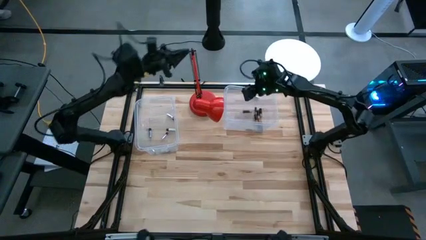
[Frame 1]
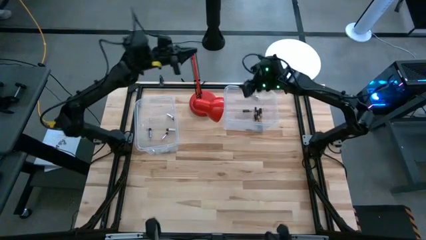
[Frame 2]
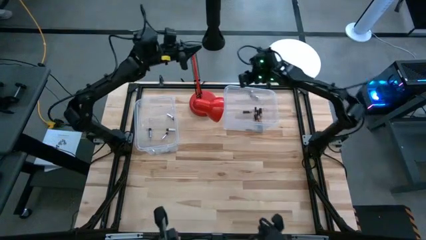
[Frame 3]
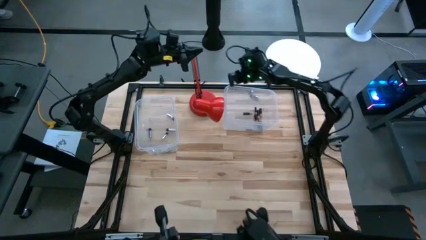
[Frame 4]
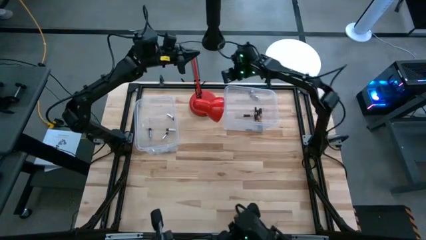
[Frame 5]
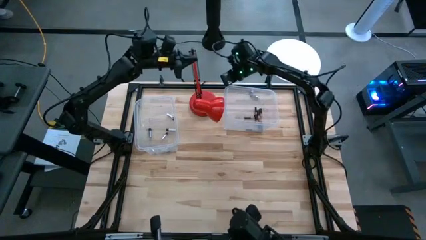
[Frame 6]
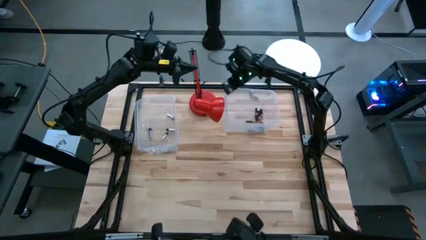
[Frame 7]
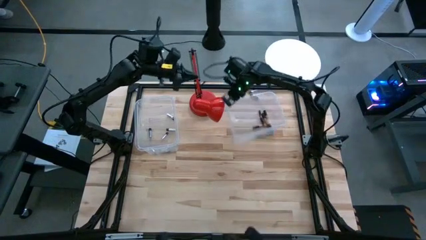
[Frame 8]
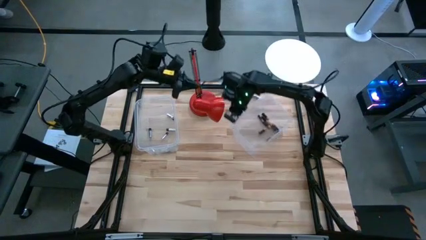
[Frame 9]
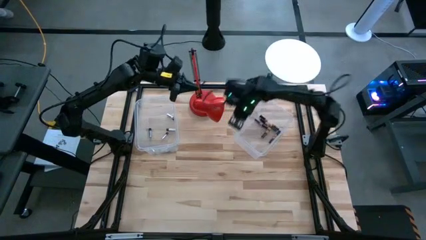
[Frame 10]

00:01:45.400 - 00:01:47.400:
Task: Sort batteries
Adjust the right transparent bin

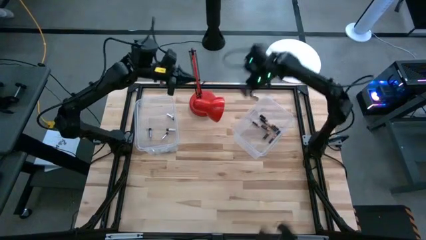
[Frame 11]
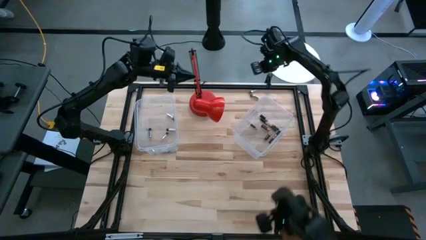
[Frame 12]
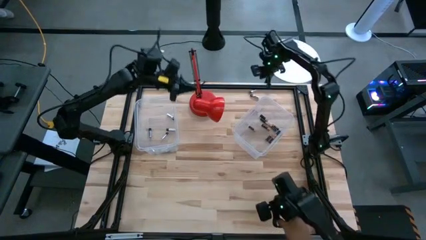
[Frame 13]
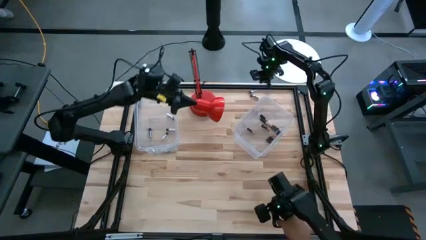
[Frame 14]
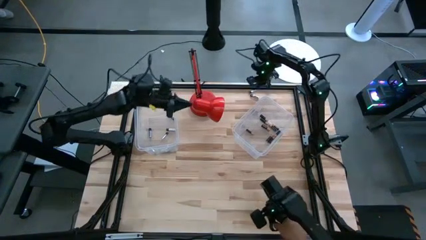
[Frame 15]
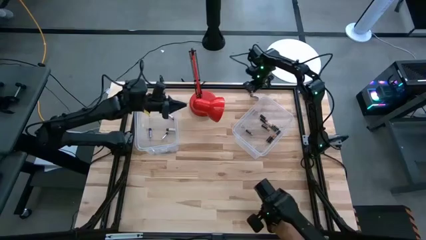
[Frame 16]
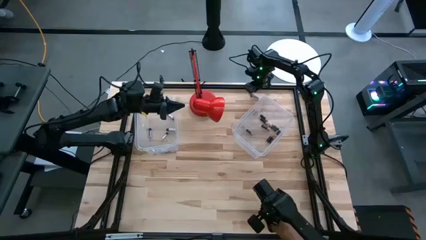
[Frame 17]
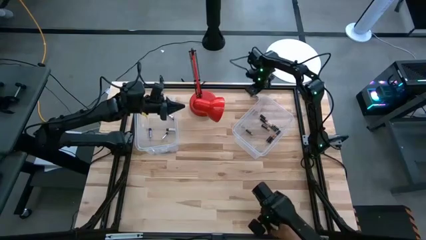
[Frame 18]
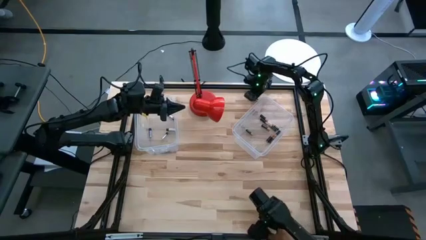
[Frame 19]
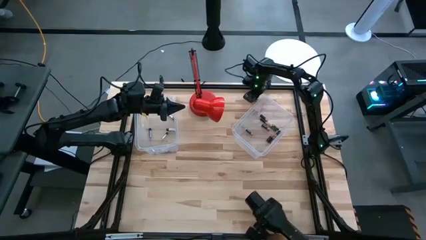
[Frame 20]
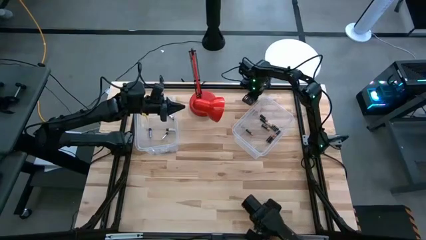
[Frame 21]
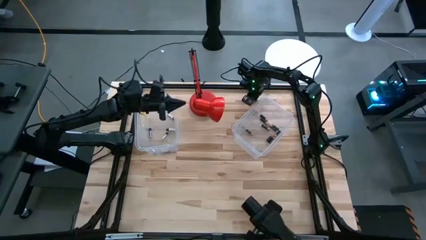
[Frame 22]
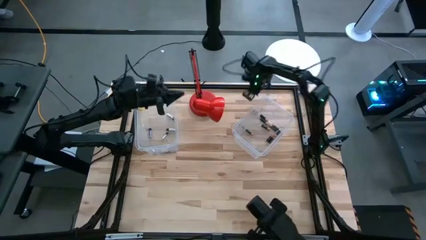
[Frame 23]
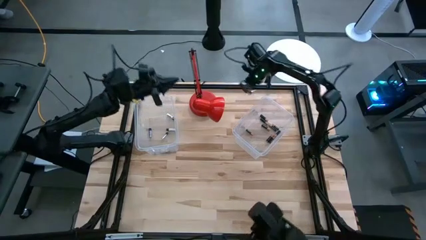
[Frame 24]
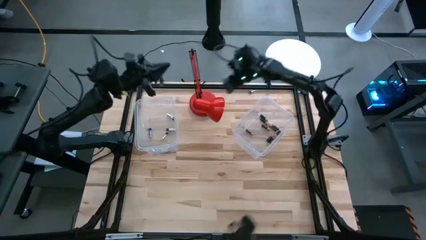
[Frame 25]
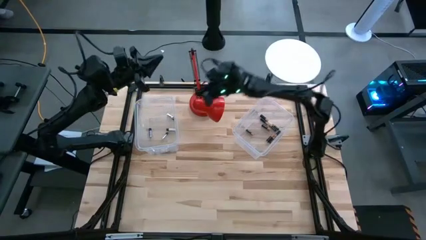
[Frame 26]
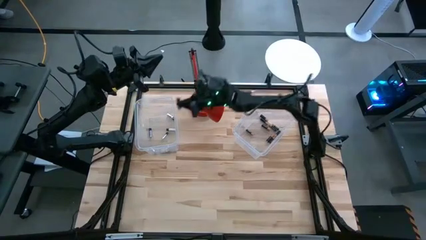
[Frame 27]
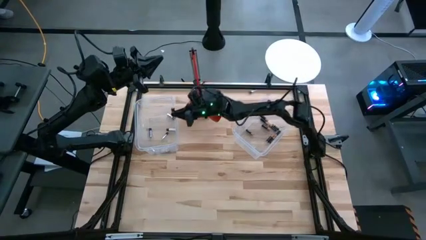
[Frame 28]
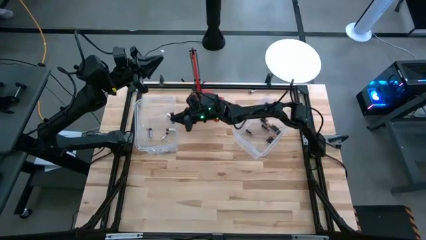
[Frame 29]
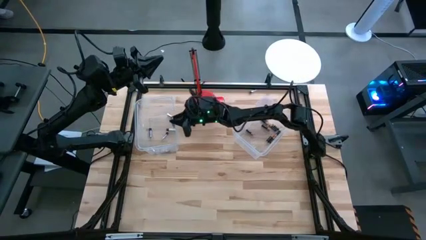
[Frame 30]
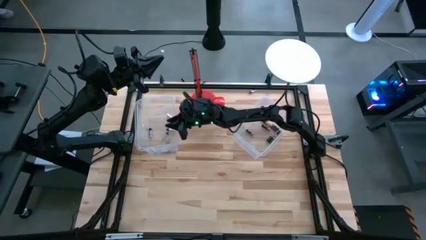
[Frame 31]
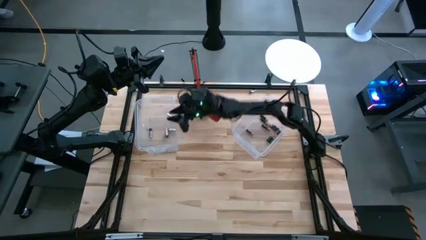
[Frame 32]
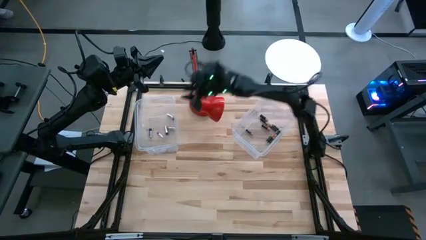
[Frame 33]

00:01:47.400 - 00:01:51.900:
Put the bottom silver battery into the left transparent bin

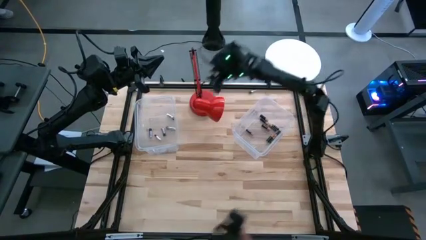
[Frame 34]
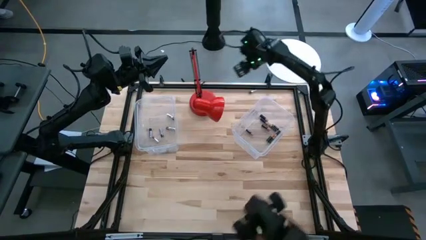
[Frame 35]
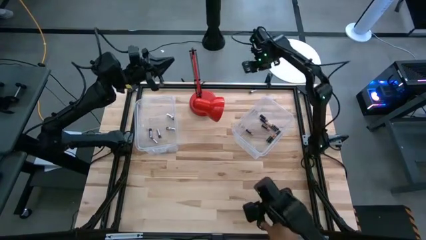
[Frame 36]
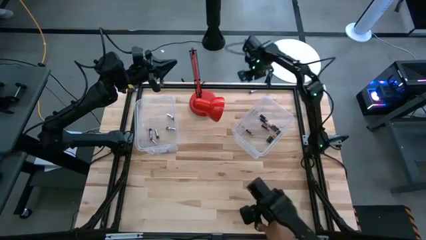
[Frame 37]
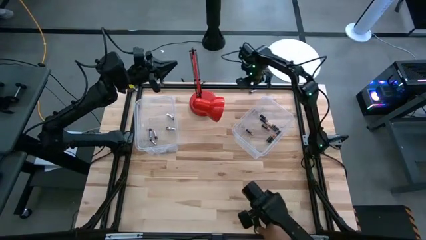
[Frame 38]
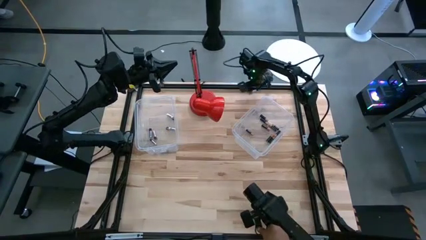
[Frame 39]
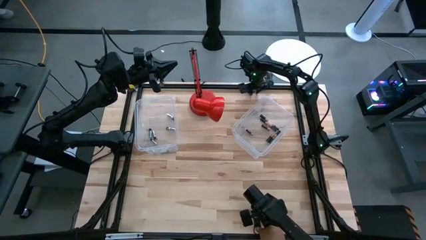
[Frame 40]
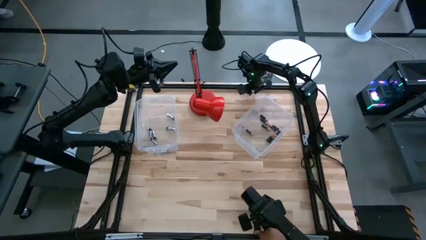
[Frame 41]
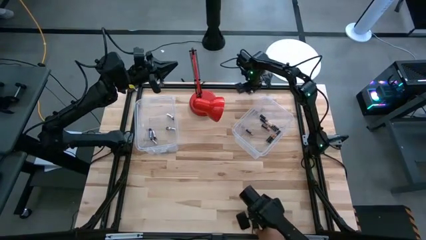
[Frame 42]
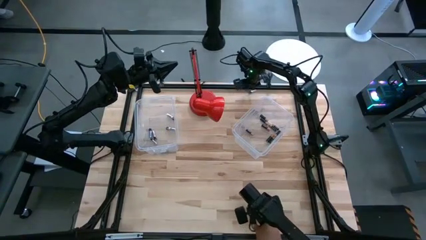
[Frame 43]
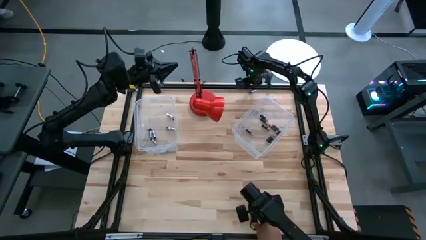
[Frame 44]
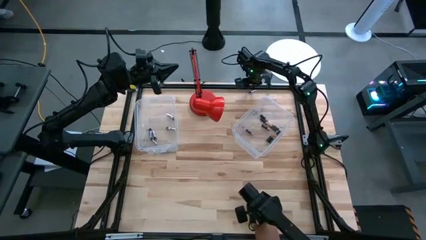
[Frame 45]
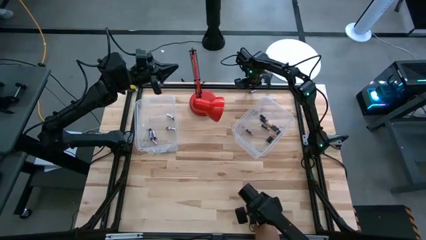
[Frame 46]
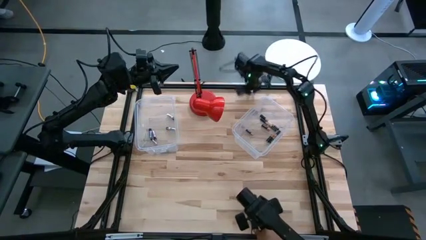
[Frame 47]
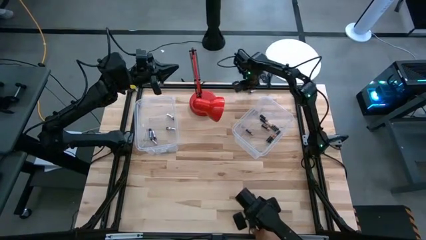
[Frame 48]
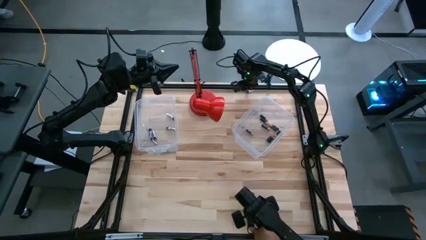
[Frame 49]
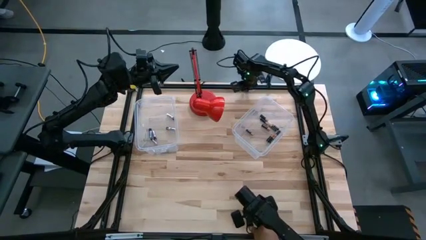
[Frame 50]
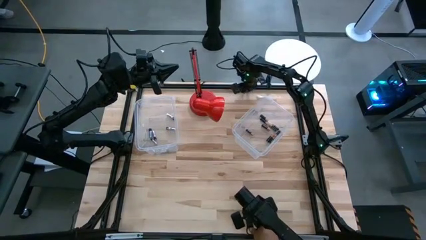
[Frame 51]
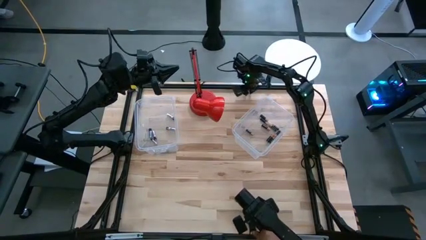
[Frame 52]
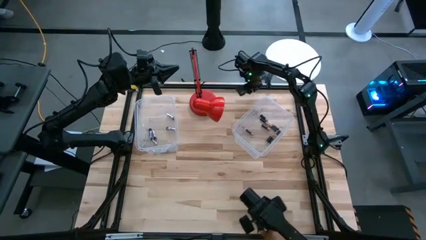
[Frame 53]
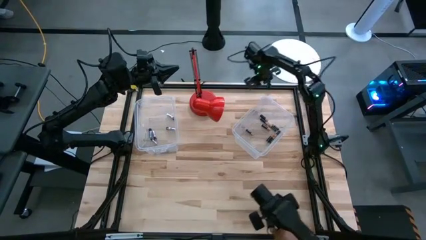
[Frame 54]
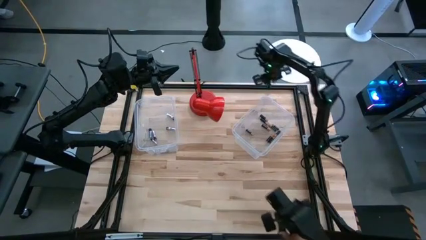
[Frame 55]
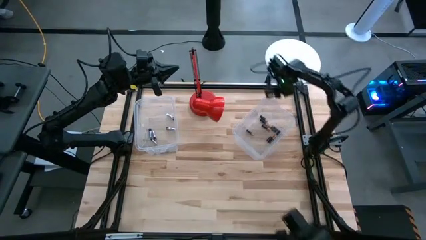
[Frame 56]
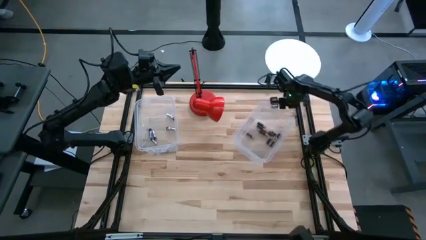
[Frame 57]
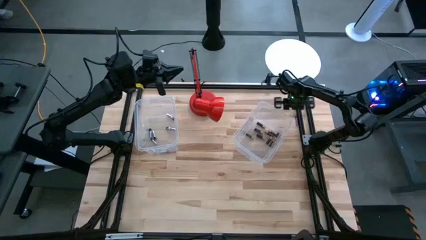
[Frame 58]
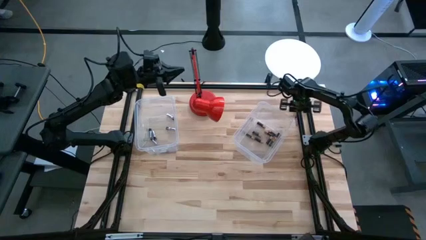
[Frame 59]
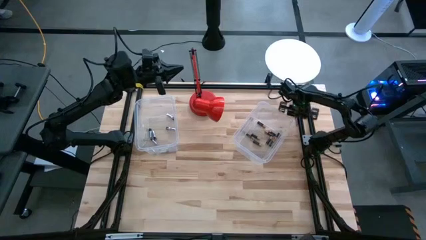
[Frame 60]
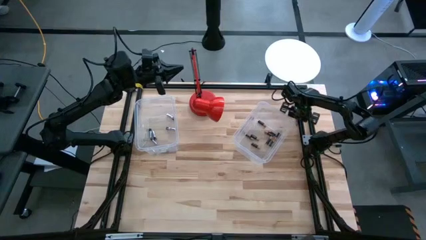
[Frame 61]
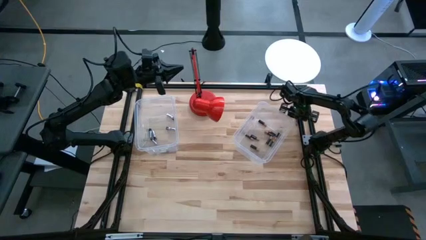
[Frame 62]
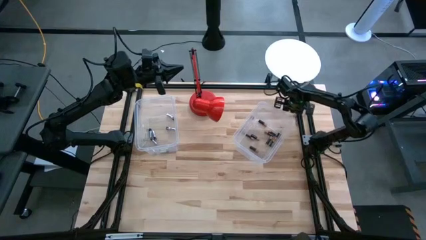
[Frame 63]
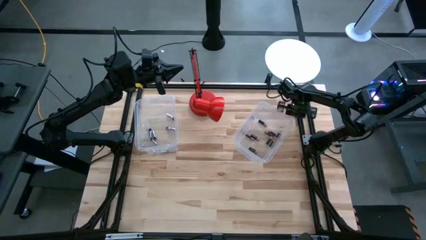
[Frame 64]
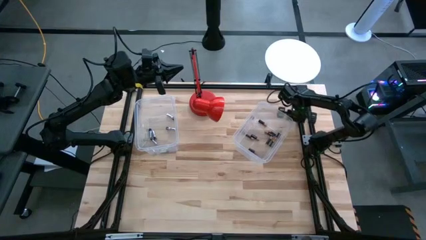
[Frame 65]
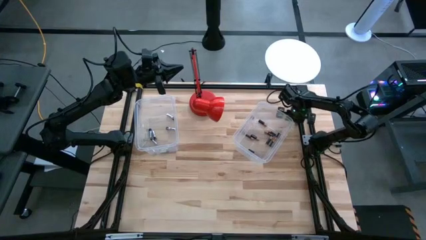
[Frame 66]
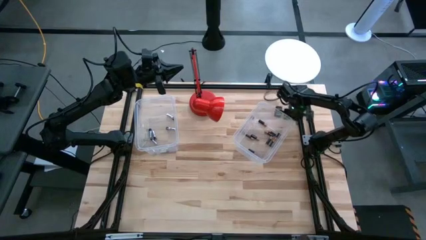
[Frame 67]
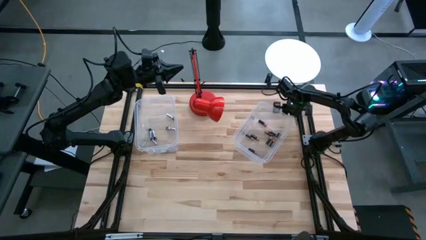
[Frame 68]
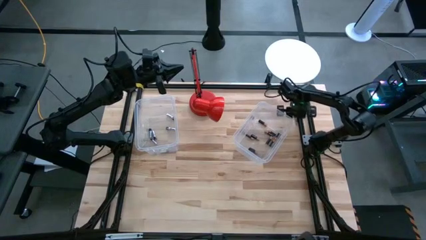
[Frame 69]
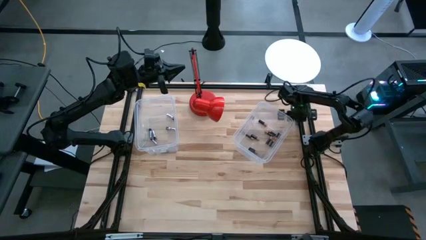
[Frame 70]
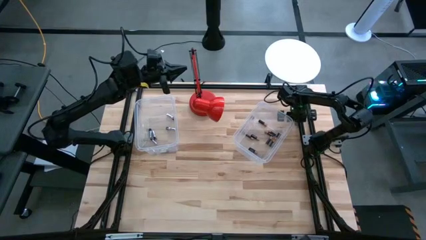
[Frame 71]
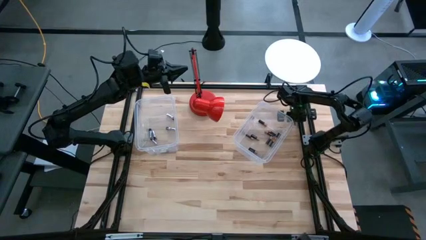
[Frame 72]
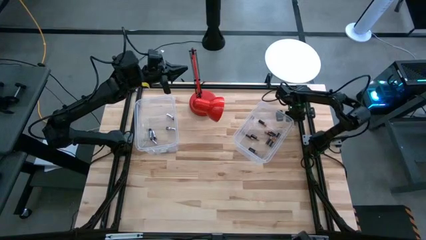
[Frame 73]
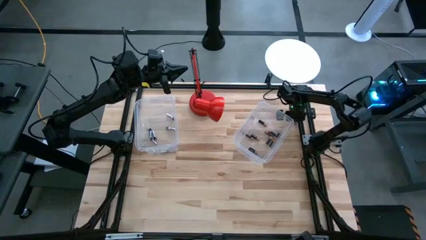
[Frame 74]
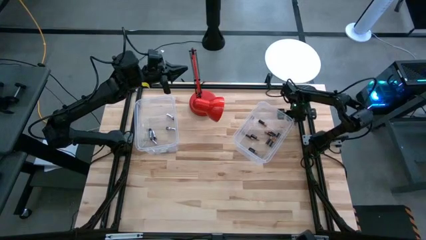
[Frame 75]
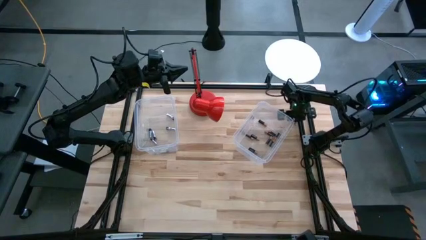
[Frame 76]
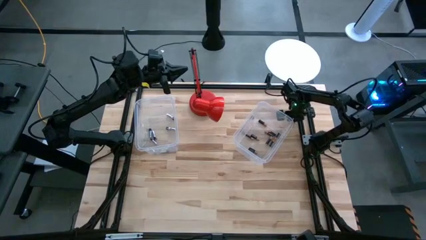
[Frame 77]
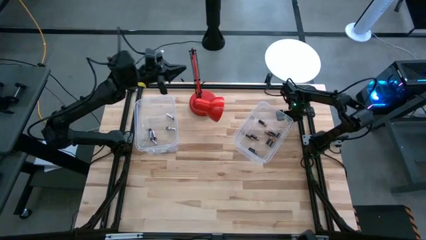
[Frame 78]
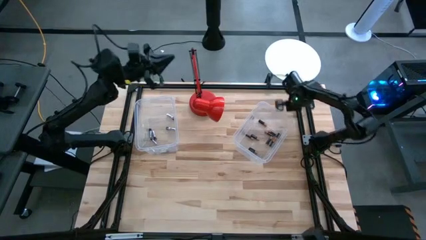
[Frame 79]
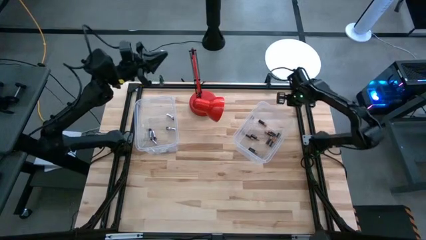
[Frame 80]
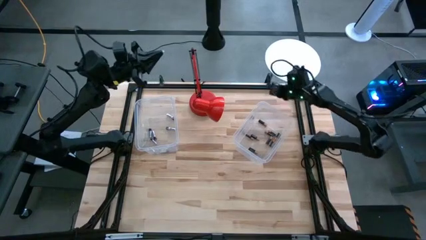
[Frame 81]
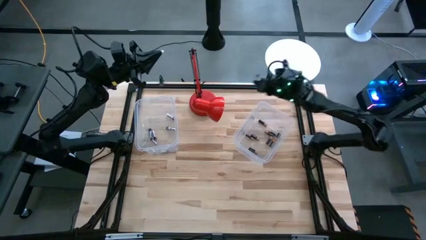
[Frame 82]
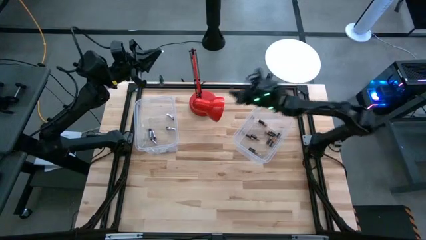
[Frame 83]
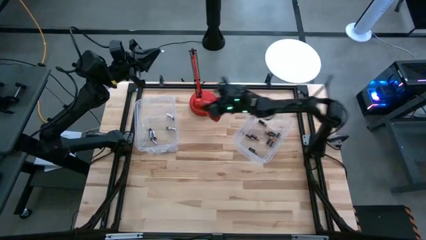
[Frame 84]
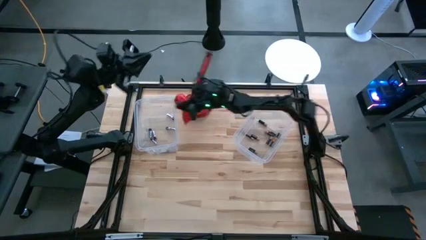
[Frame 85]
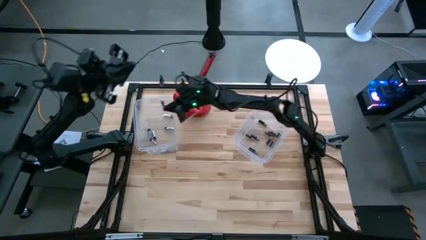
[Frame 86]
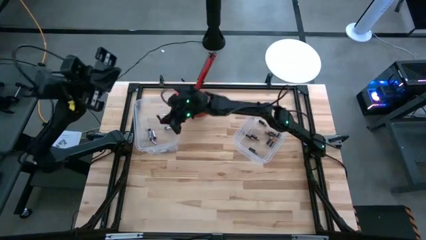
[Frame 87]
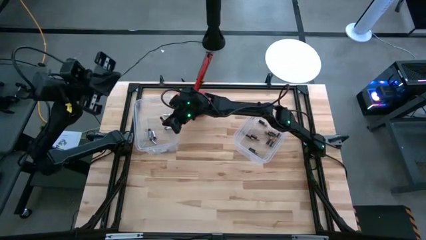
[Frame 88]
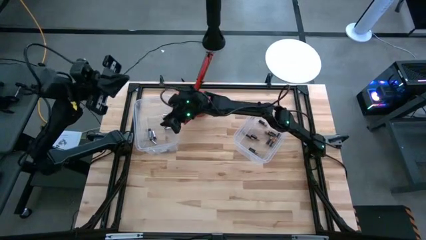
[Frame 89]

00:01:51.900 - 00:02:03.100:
Put the silver battery into the left transparent bin
